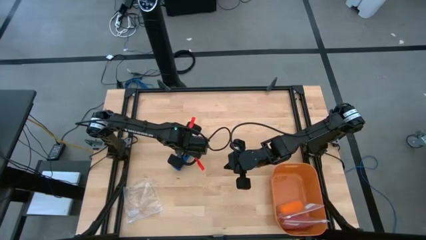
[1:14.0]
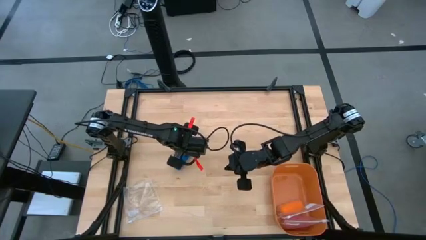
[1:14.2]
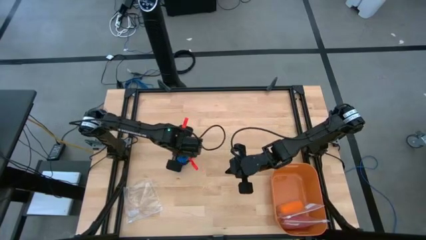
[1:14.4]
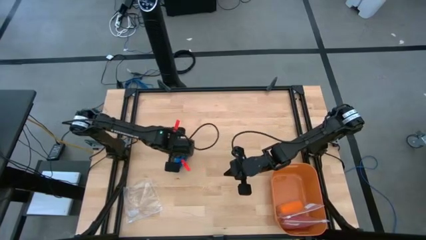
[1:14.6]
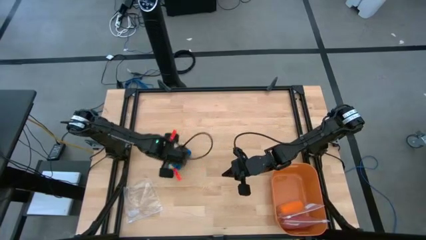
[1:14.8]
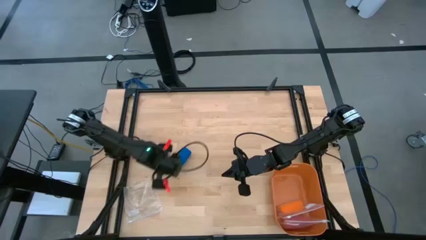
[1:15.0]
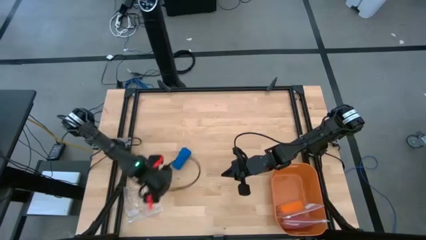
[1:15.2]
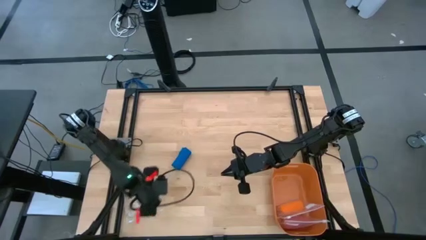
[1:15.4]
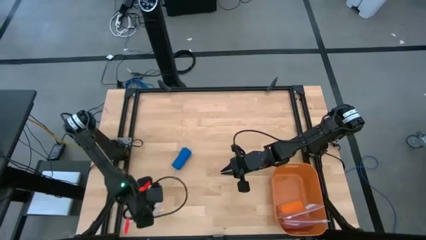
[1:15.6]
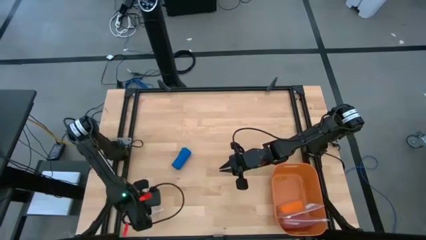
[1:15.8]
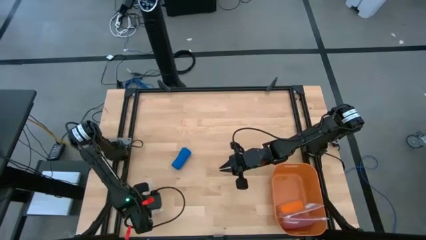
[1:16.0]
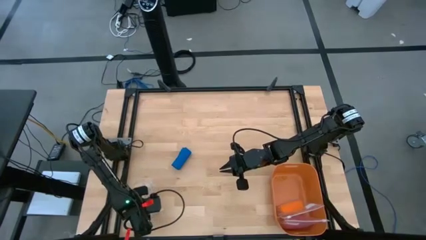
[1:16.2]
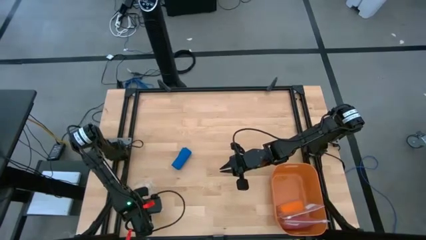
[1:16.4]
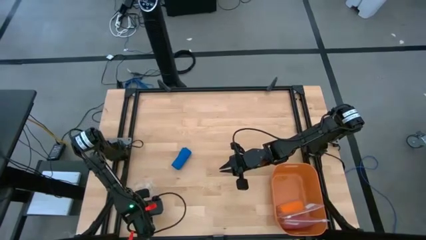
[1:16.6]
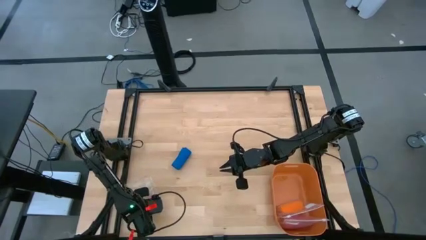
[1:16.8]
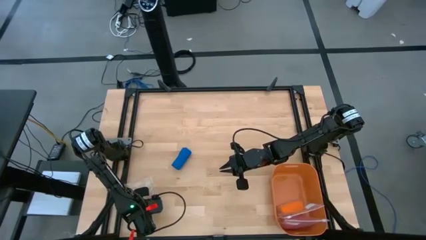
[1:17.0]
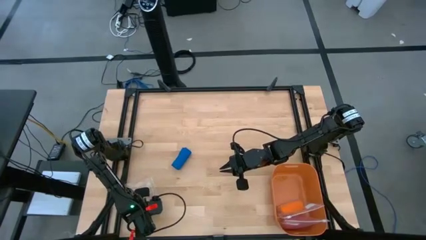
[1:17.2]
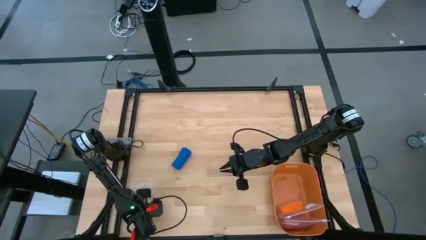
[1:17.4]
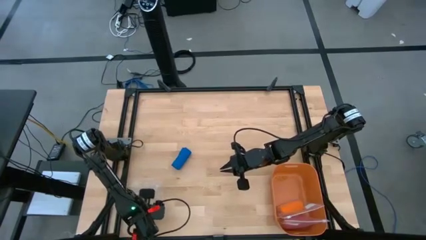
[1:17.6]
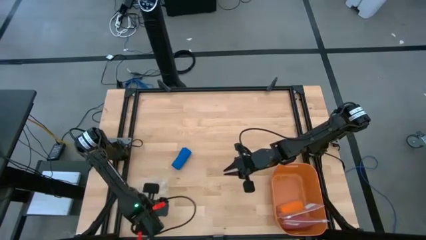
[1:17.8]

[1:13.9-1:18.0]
Task: Roll bandage
Open the transparent zip lock bag

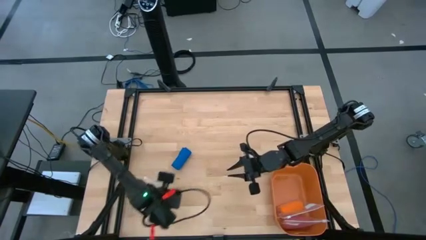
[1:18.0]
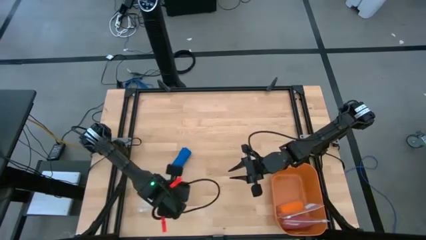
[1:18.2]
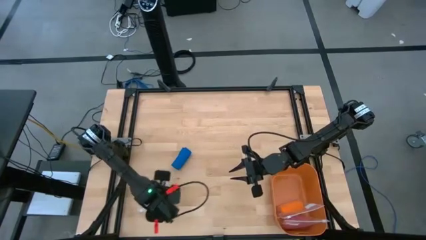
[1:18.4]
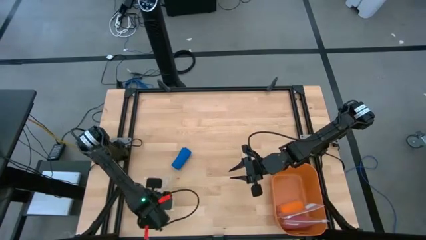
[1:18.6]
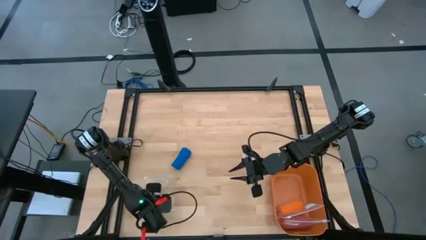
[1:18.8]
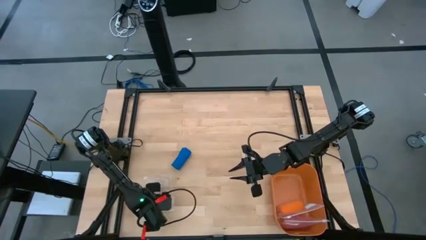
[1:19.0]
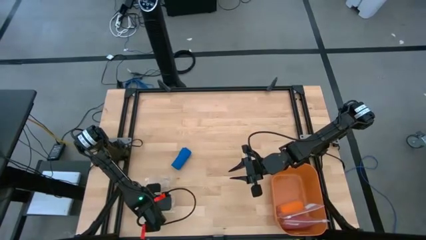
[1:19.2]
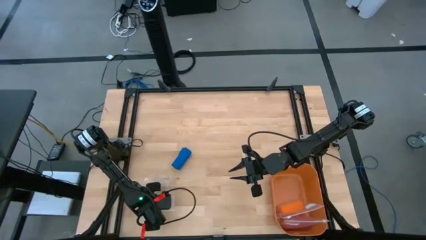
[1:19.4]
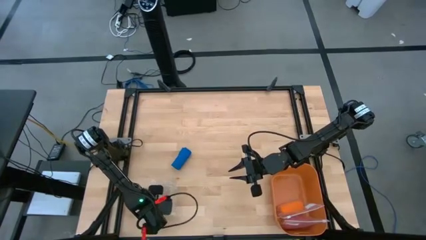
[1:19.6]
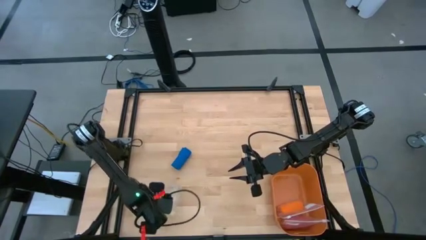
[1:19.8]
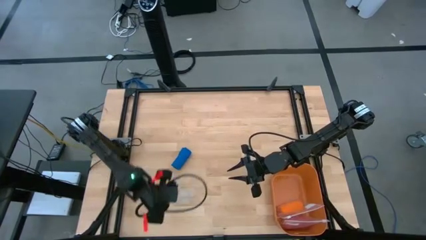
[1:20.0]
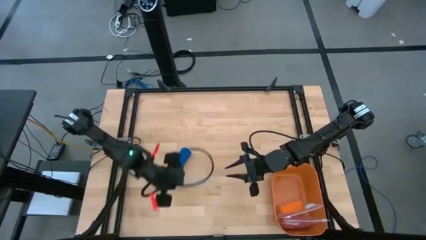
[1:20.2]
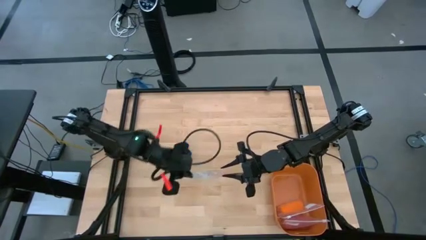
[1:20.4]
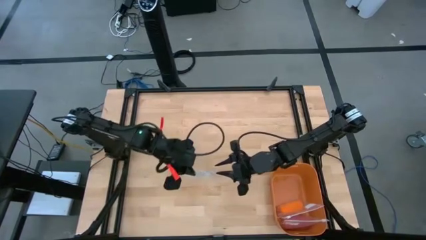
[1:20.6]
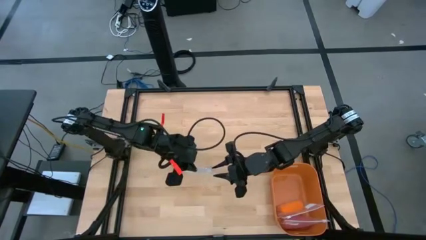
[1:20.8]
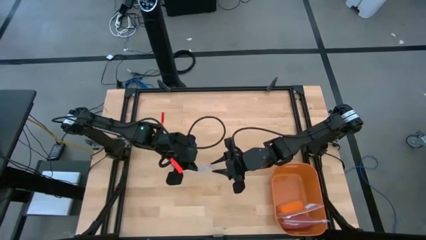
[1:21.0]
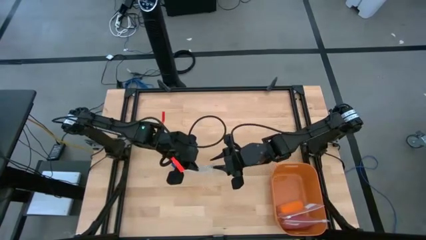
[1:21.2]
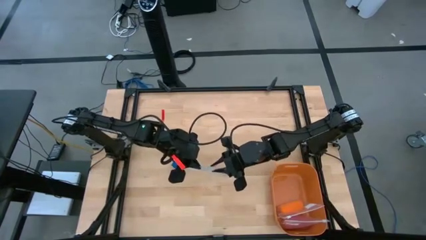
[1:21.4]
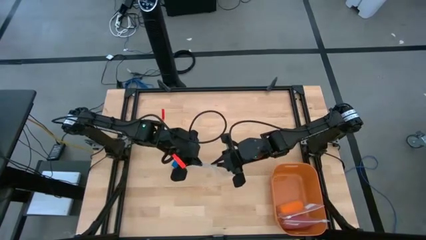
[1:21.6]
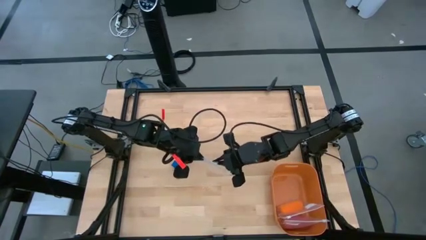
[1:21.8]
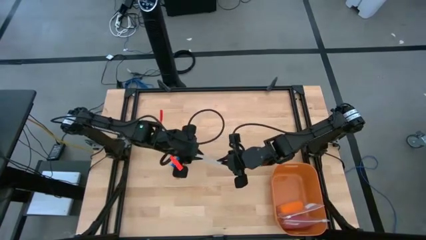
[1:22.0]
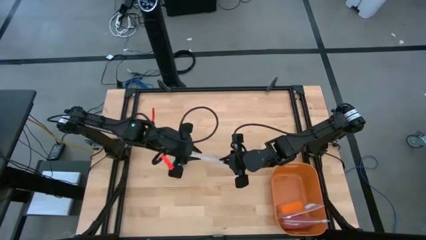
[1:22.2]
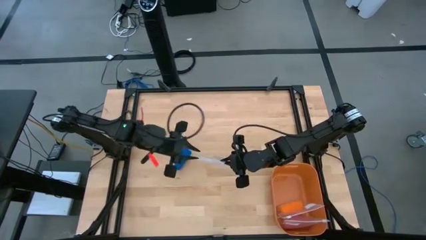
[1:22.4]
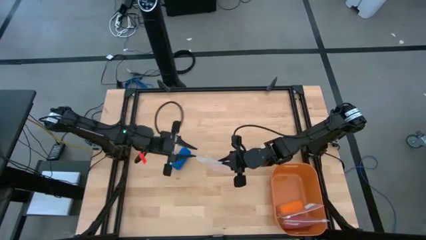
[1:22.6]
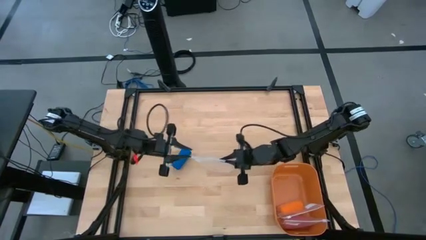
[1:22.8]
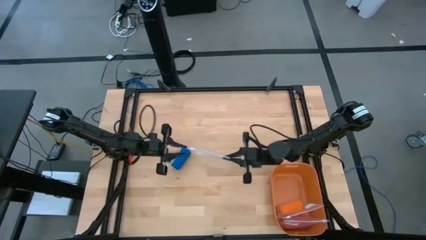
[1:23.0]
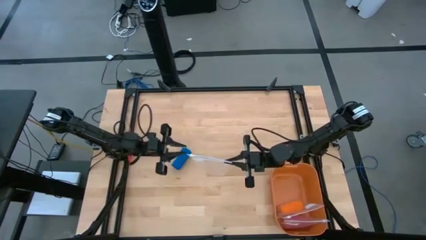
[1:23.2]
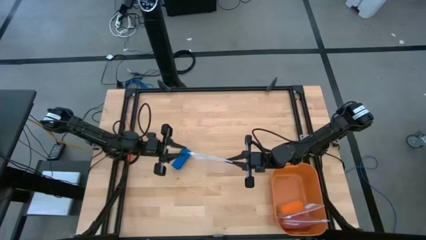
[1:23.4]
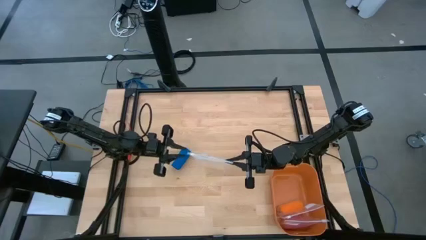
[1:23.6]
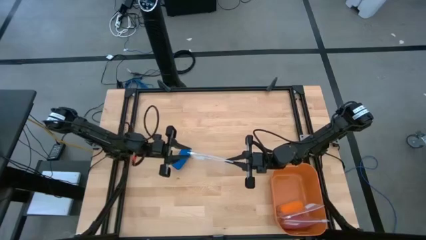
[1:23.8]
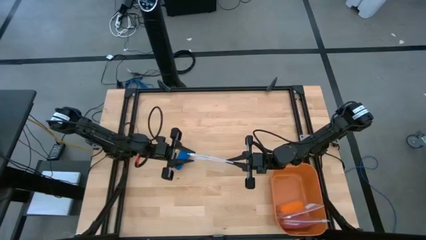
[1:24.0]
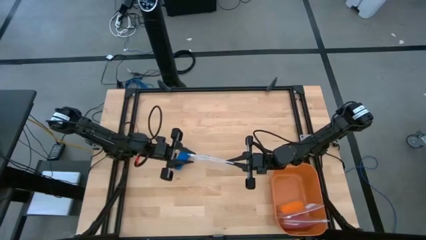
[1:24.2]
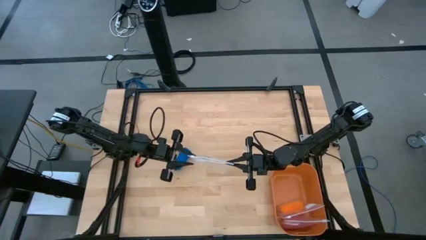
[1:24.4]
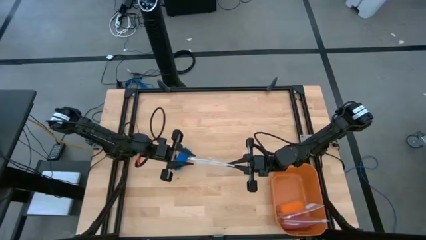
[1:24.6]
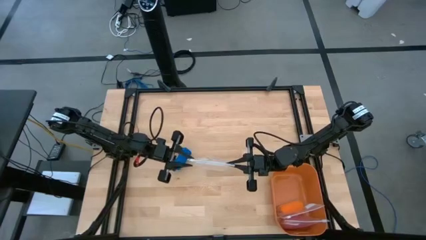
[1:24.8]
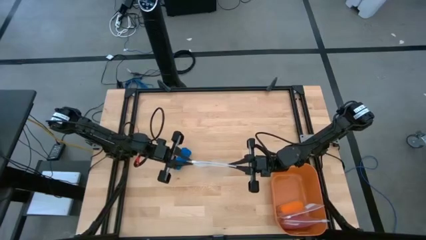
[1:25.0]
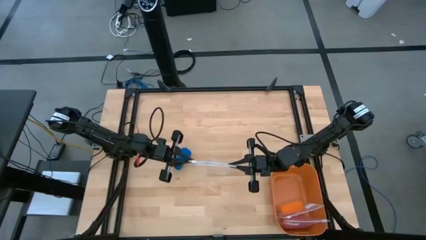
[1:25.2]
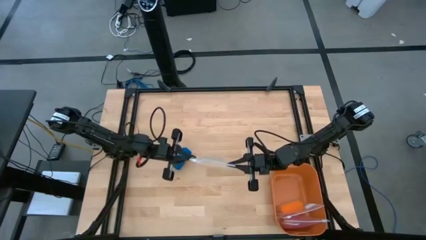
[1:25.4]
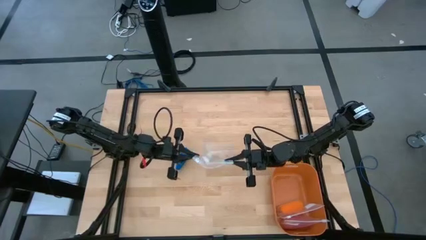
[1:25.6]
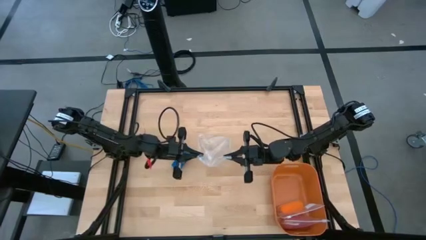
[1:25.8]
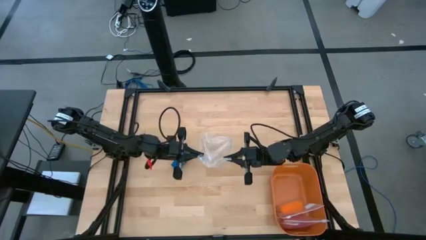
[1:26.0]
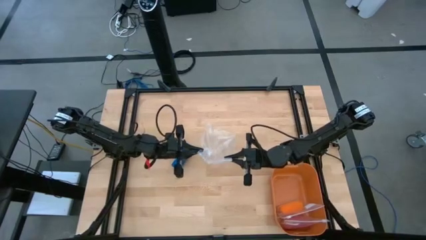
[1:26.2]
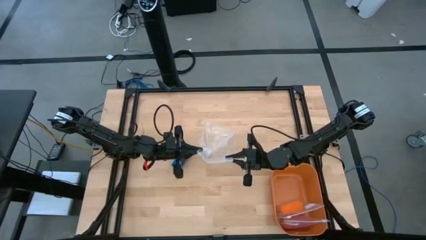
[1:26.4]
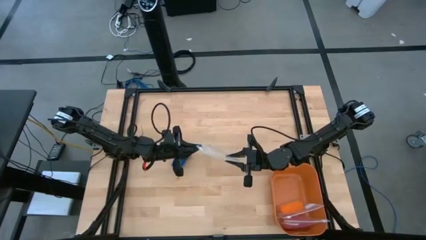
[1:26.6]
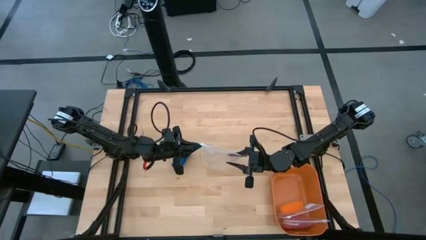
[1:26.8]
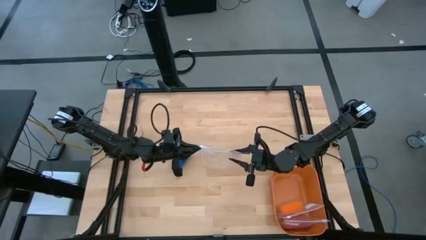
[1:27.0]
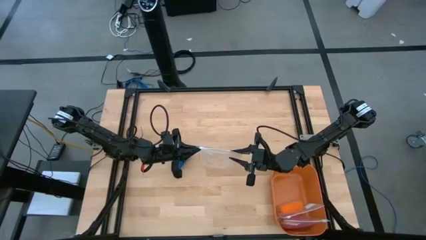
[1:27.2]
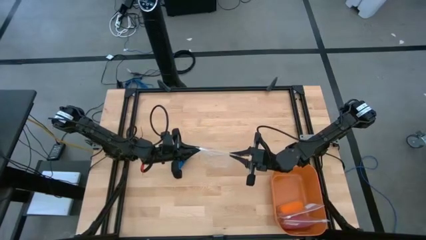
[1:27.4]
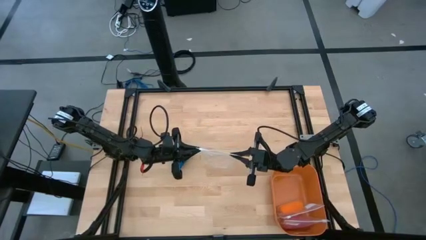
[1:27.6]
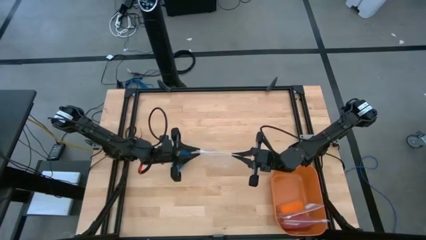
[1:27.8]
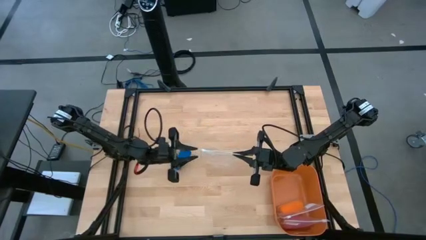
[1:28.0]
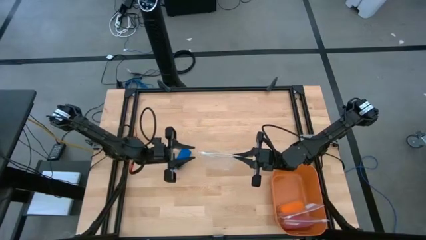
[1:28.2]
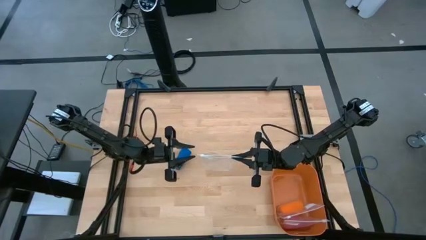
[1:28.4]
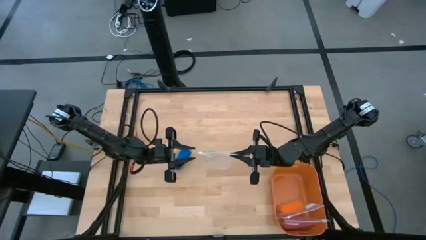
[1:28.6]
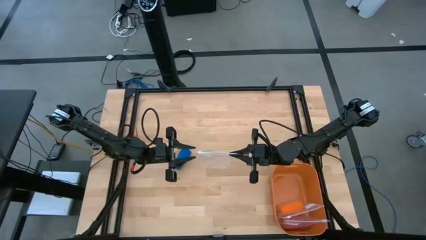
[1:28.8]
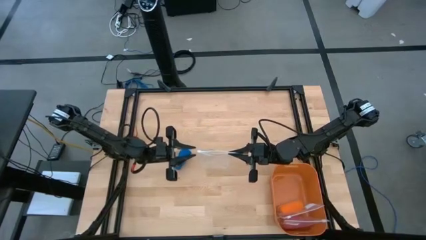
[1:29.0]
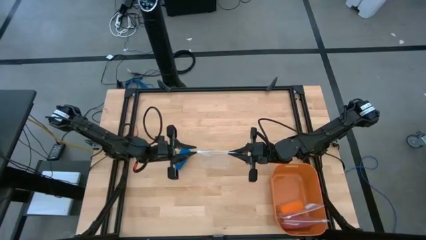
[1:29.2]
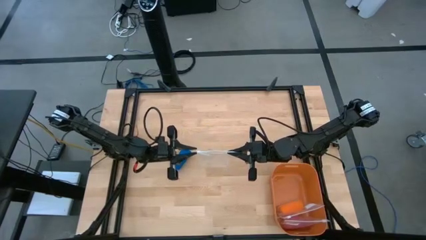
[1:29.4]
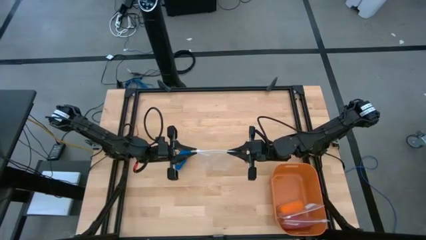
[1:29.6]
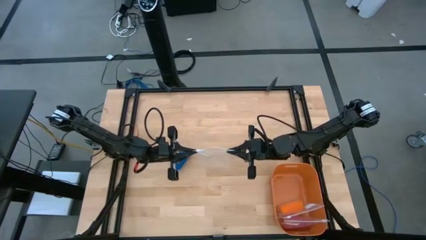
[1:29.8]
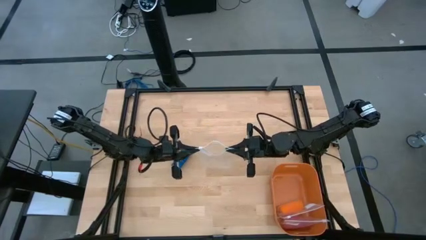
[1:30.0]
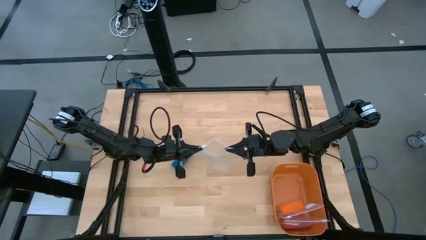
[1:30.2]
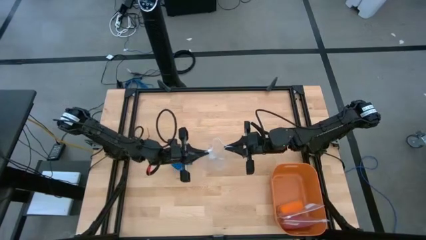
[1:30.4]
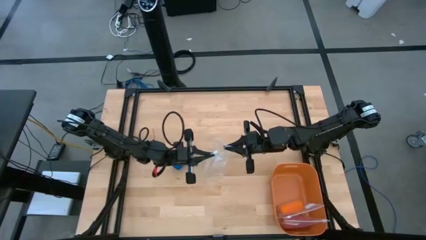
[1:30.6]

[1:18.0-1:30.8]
Open the transparent zip lock bag
